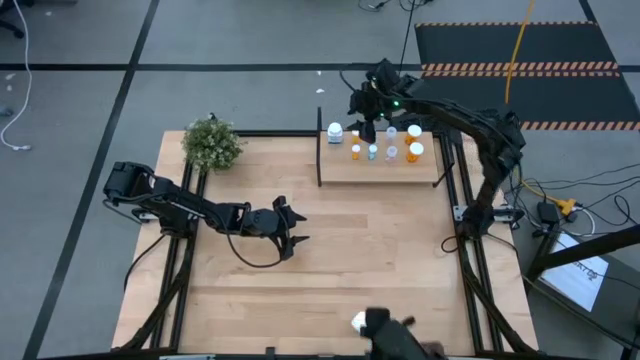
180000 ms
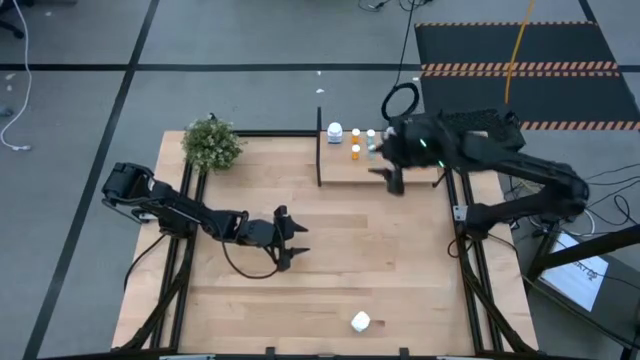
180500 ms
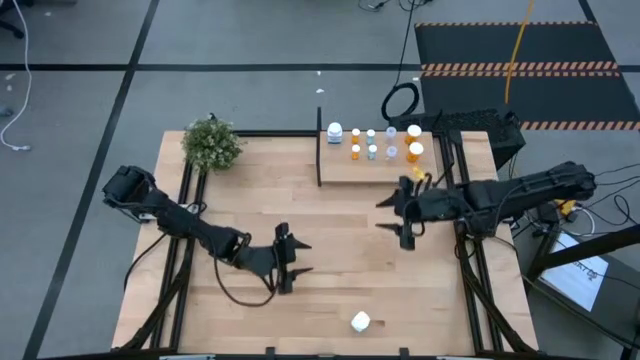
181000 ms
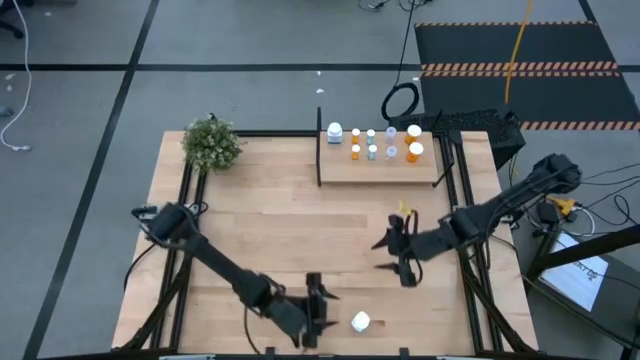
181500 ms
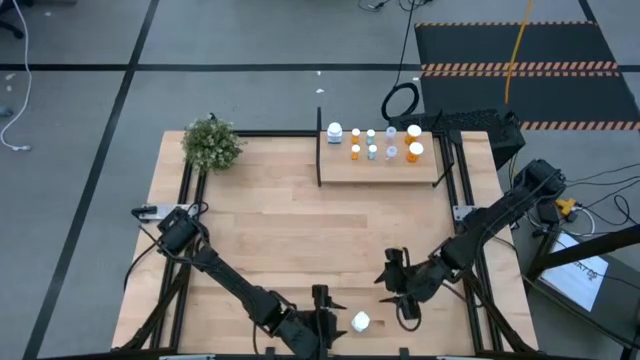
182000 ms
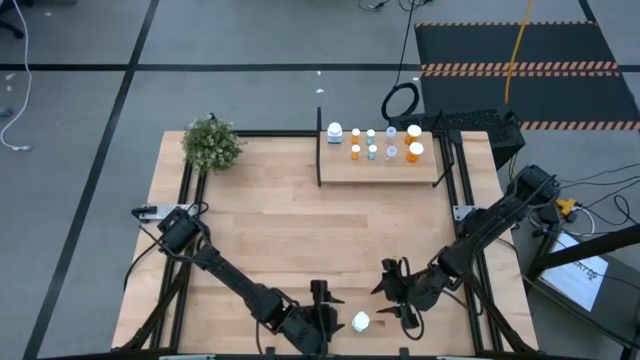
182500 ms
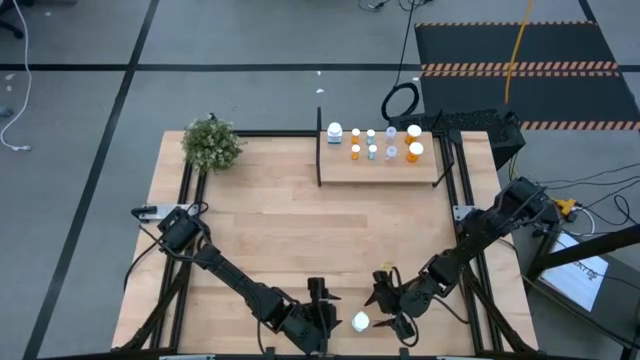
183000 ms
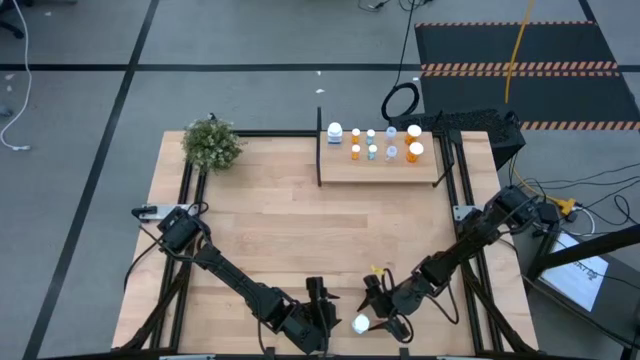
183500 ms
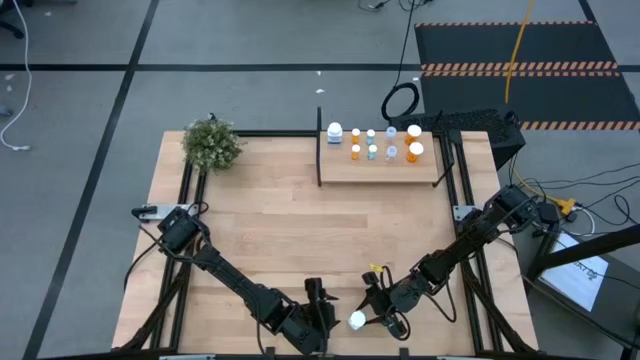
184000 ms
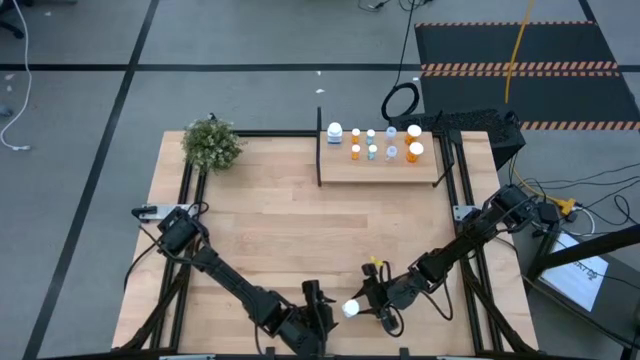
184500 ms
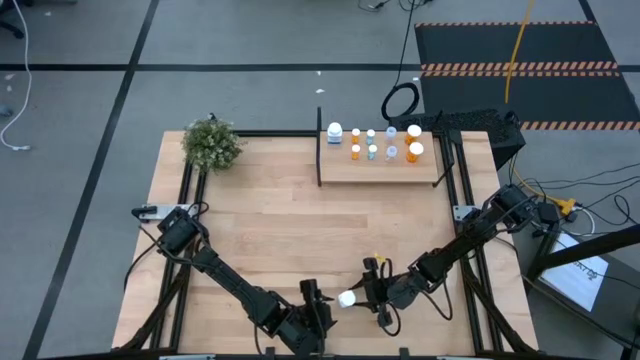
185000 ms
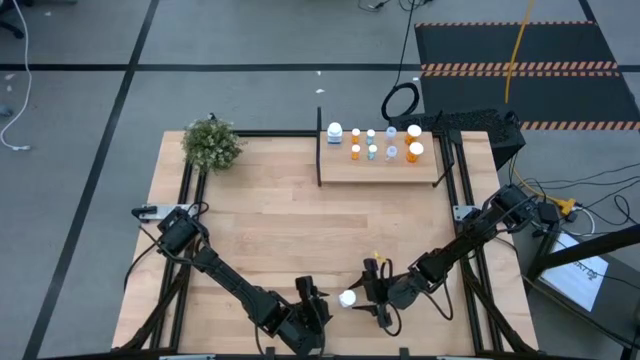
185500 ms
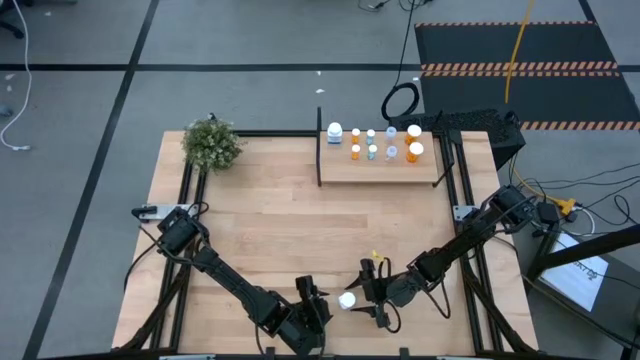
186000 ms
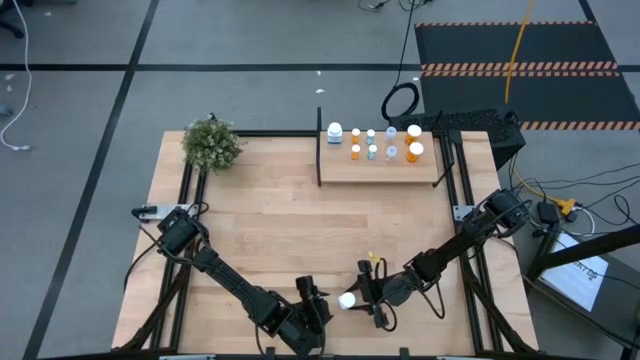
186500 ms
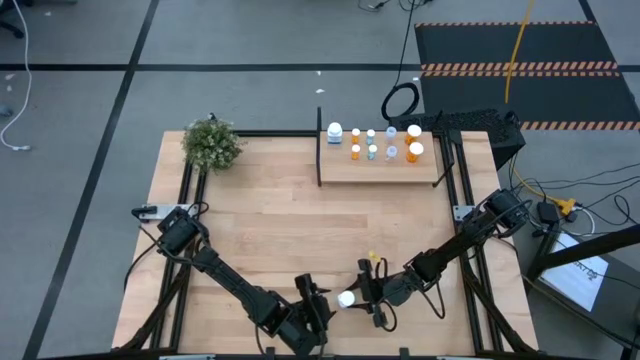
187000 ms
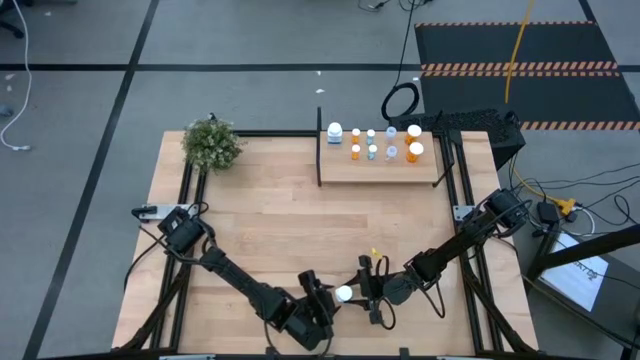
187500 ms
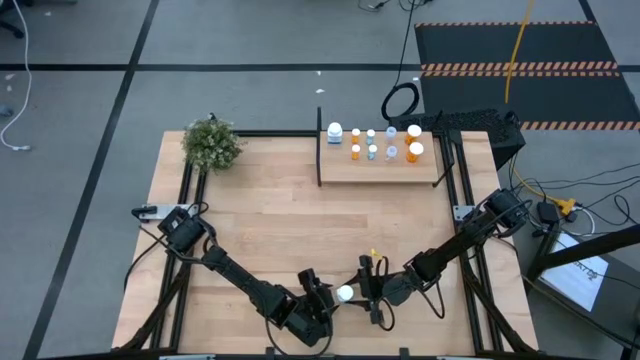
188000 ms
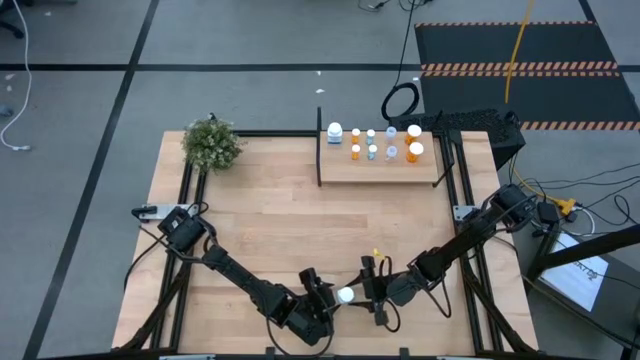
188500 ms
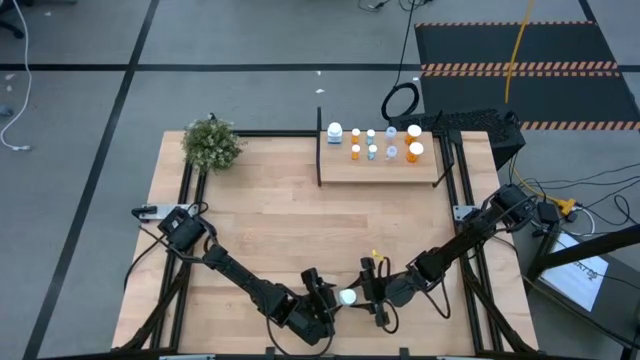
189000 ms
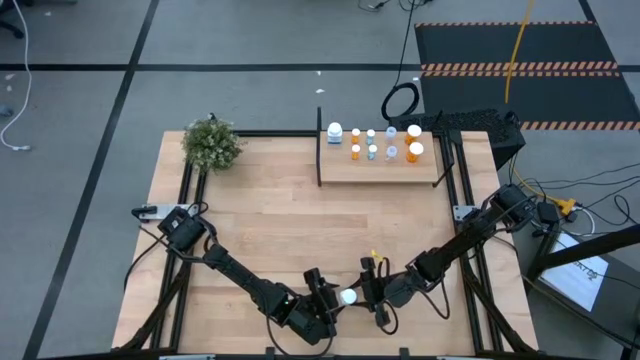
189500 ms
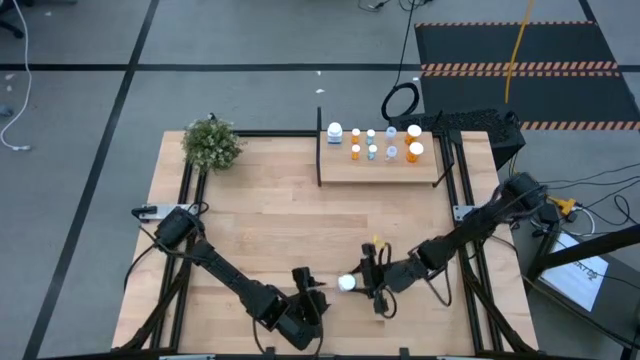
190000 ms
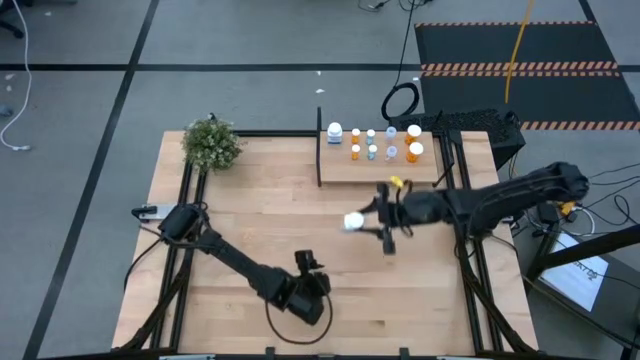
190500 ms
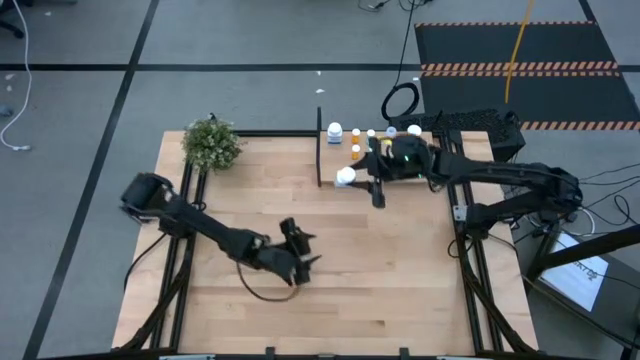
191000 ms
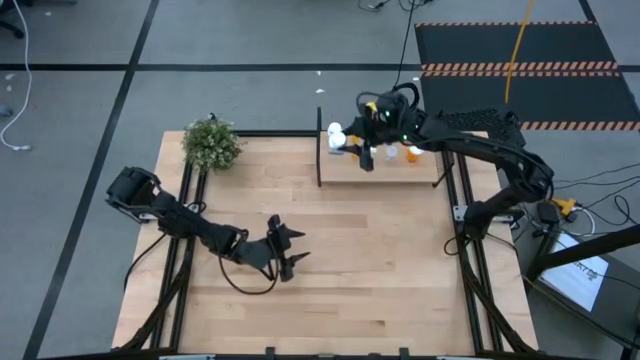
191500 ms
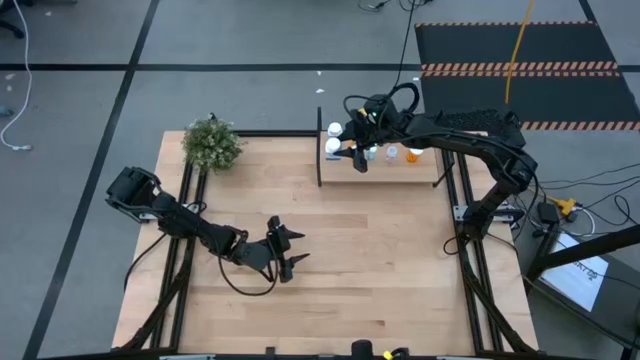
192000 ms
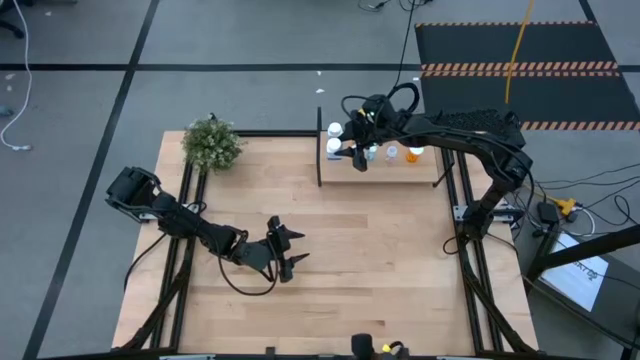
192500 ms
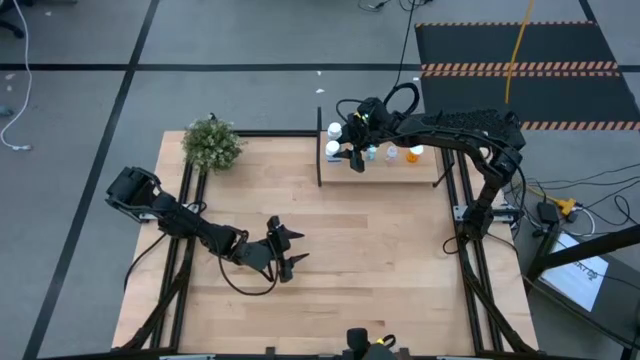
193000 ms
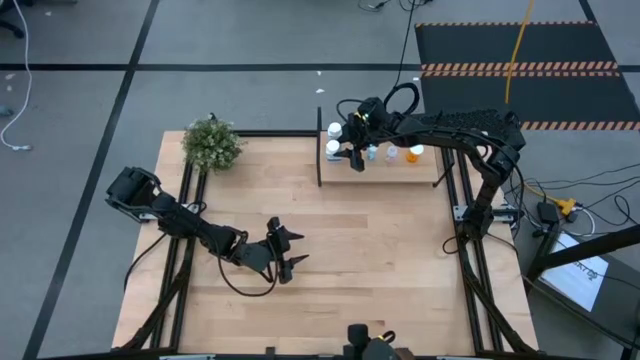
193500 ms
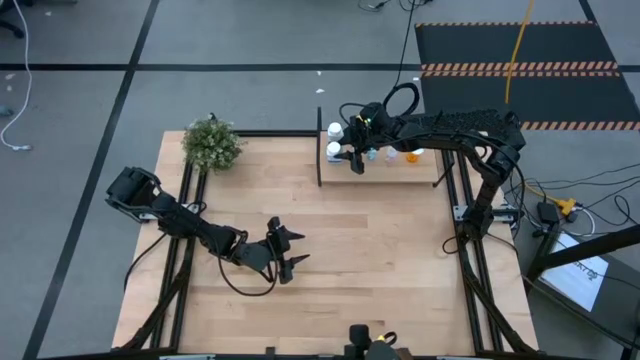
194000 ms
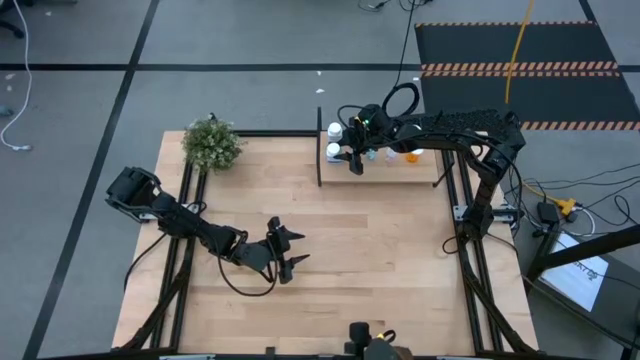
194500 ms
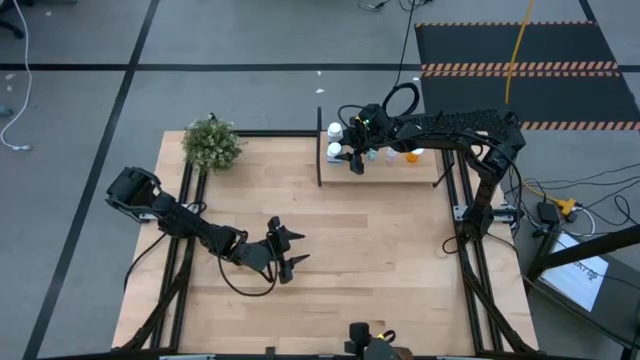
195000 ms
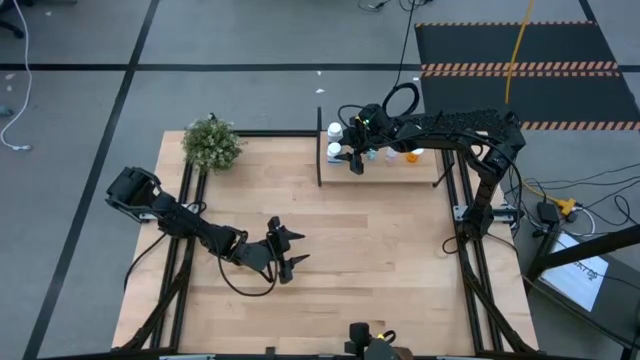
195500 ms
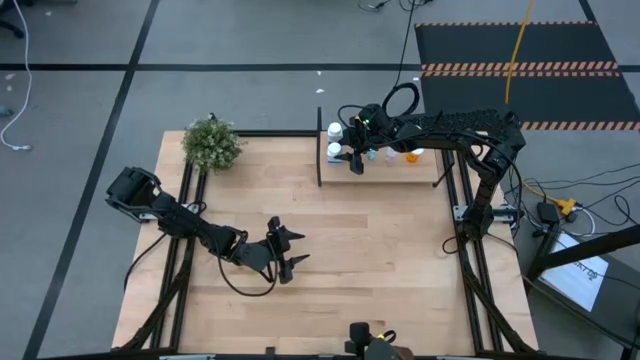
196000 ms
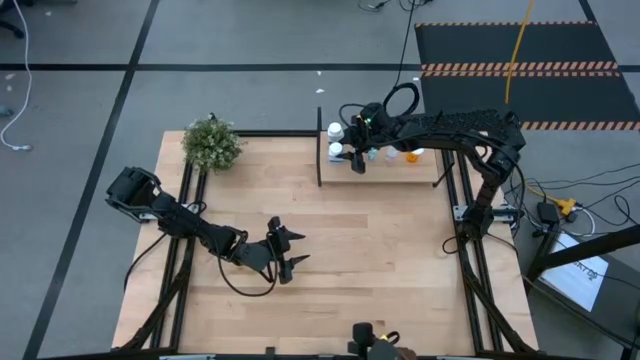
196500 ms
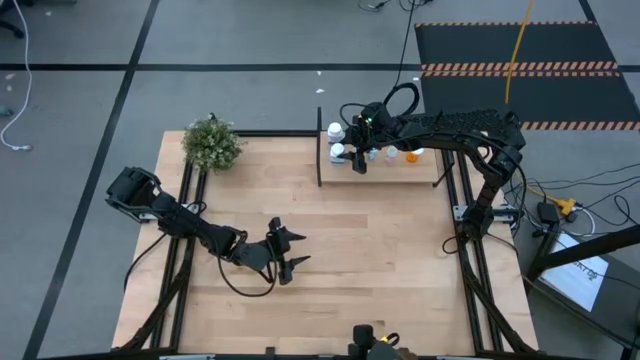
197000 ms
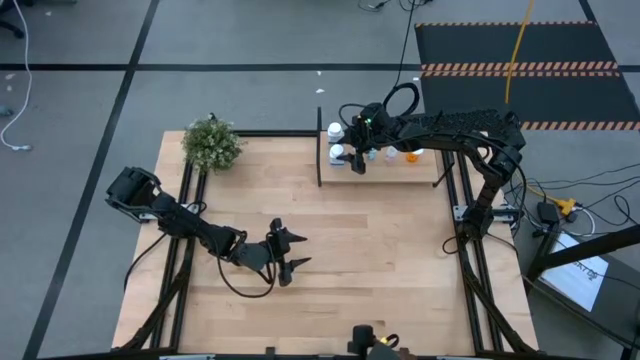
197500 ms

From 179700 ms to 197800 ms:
Task: Pick and place medicine bottles onto shelf by color
Put the white pill bottle on the shelf aligned with the other white pill bottle
